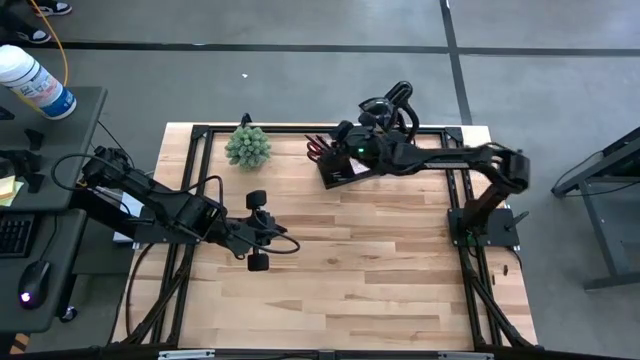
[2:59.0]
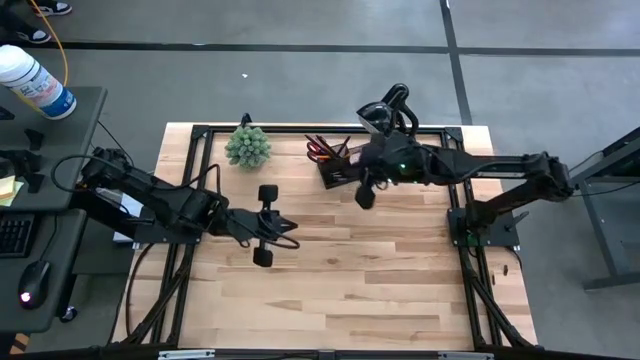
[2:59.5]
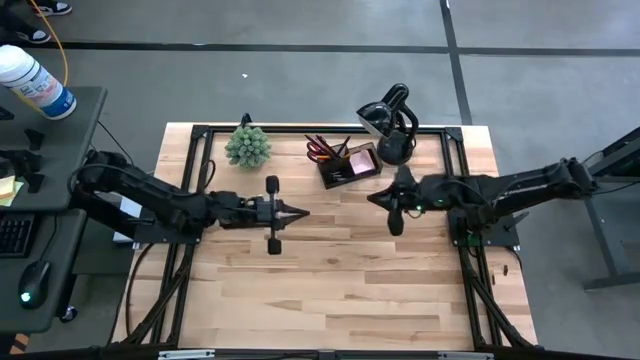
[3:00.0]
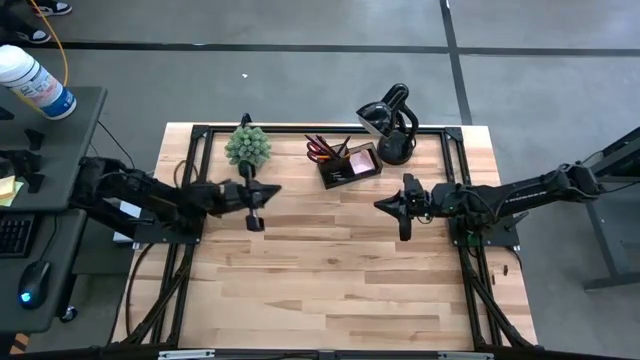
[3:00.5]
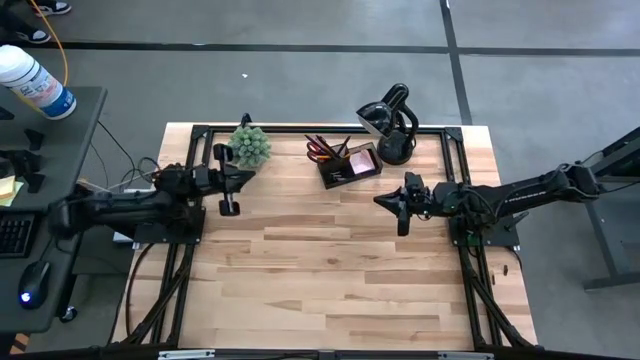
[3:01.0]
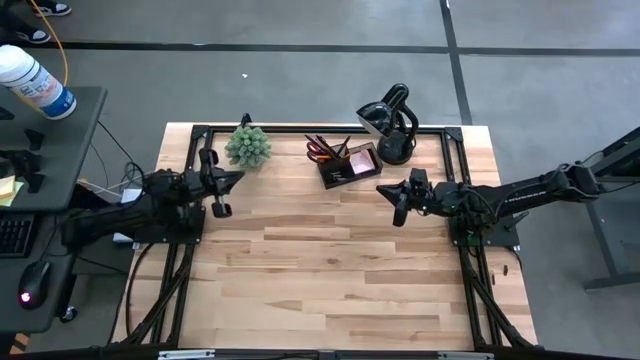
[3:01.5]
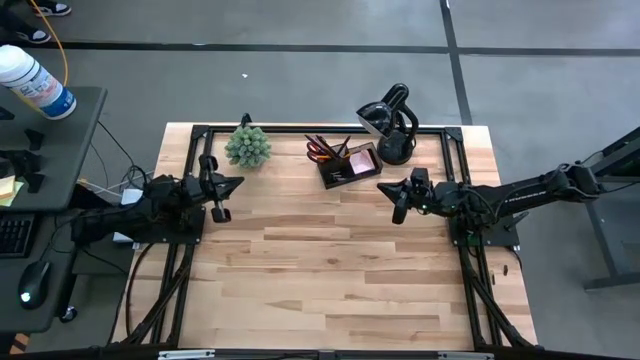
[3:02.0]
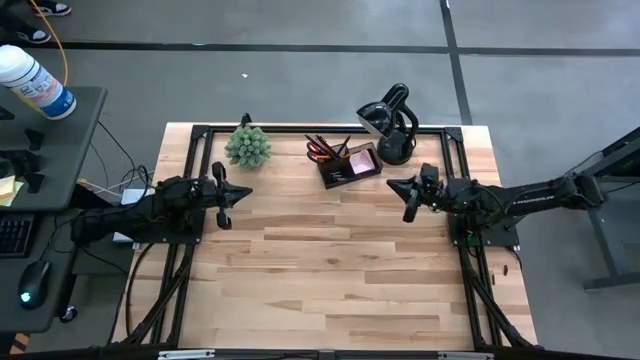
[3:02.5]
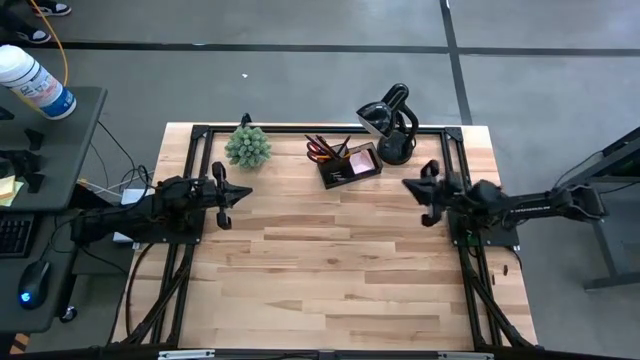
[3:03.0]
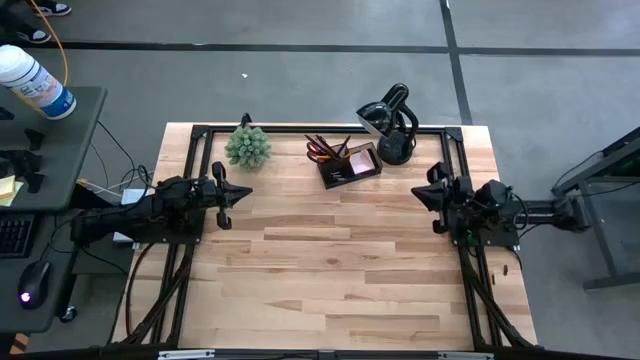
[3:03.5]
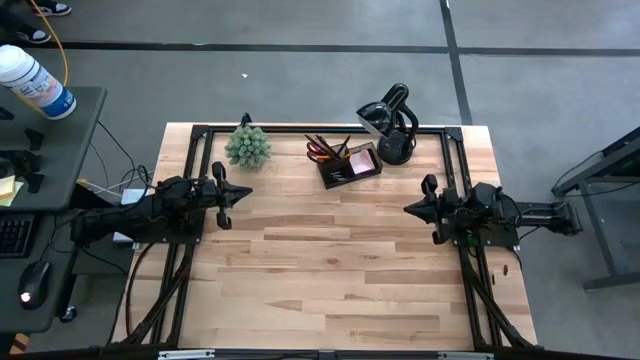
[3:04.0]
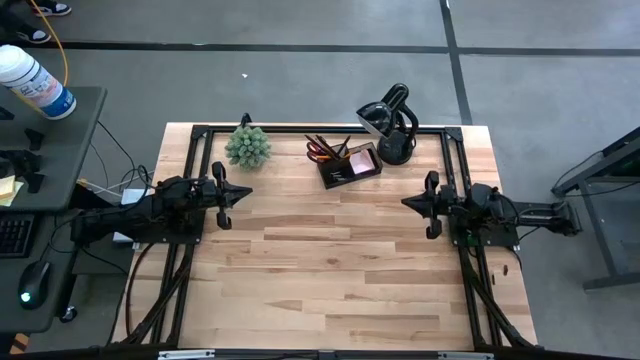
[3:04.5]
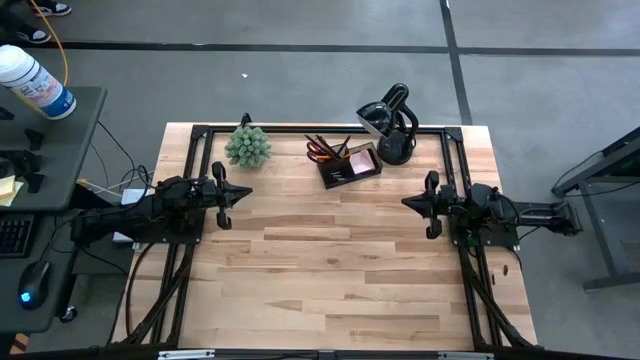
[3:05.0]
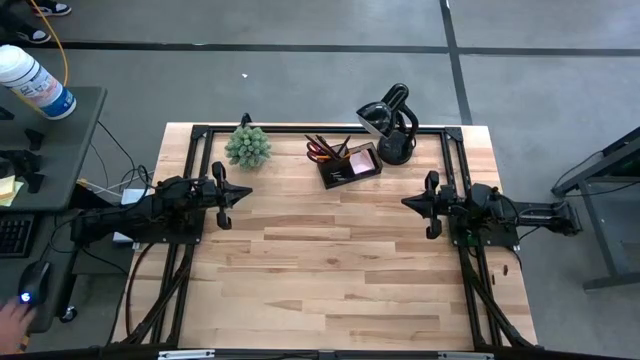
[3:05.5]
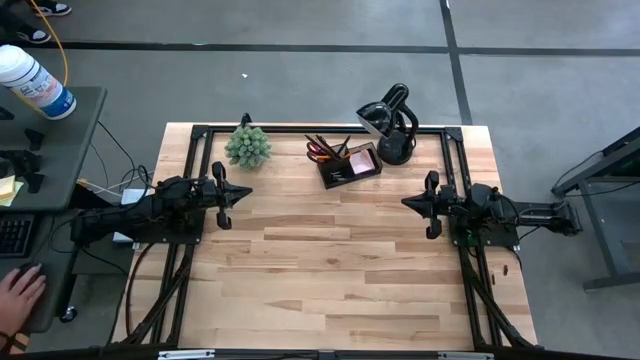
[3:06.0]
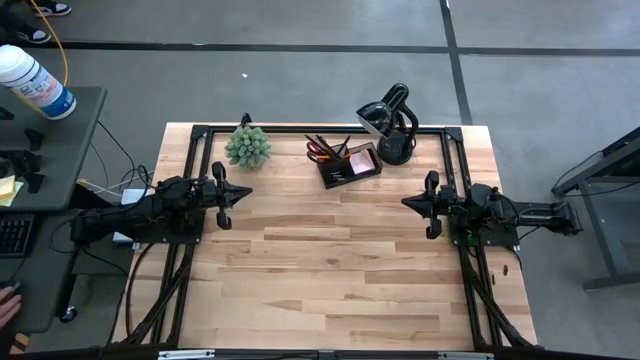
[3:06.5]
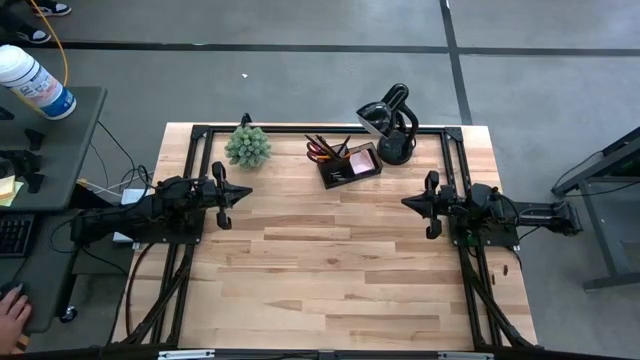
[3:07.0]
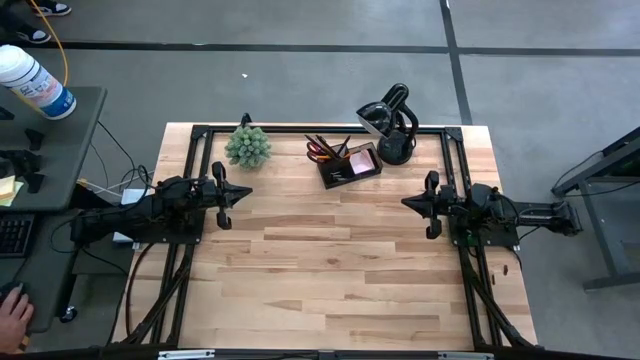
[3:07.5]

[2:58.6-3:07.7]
Task: Pick and place office supplies into organizer
Return to Home Position

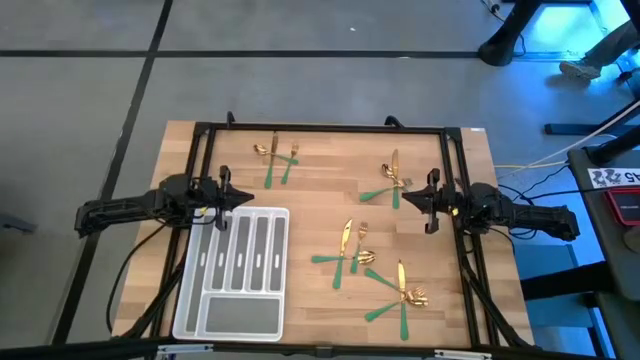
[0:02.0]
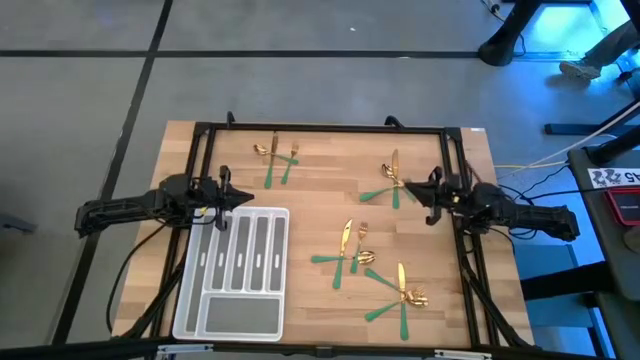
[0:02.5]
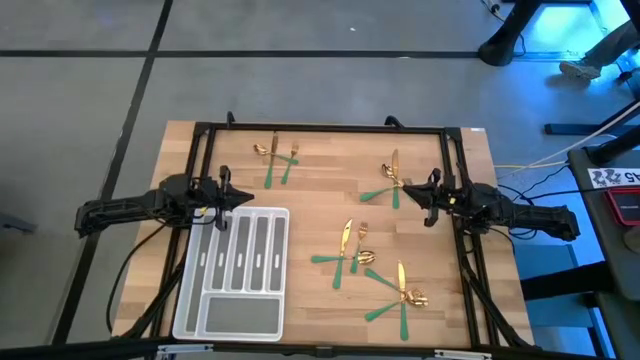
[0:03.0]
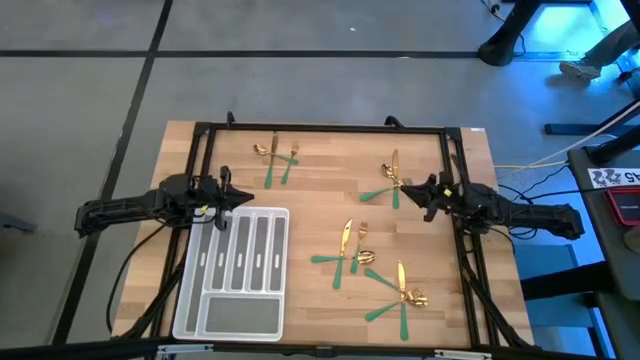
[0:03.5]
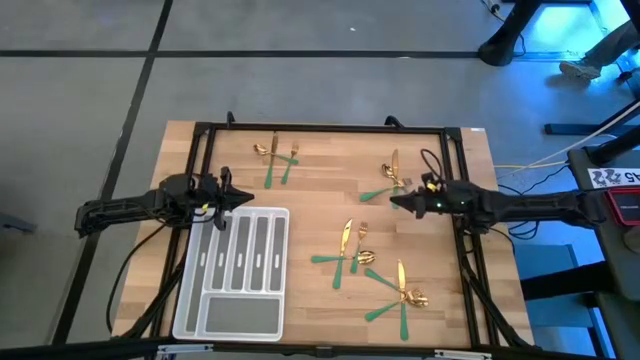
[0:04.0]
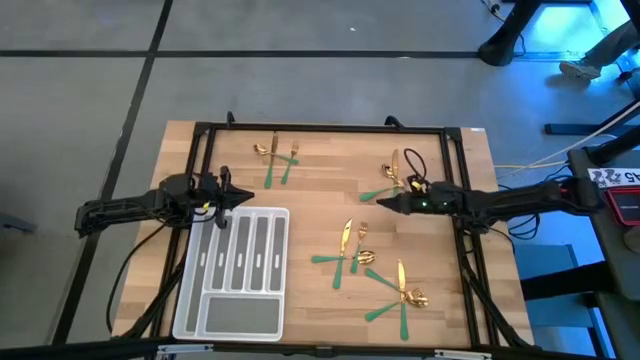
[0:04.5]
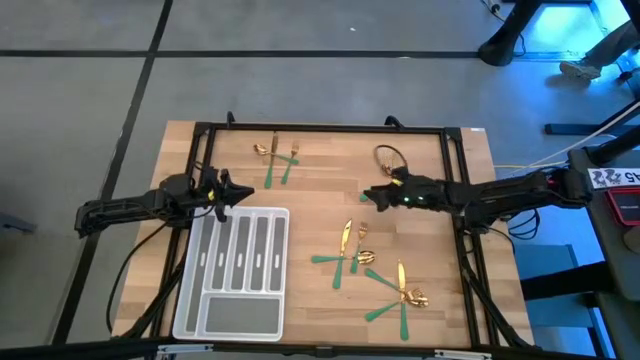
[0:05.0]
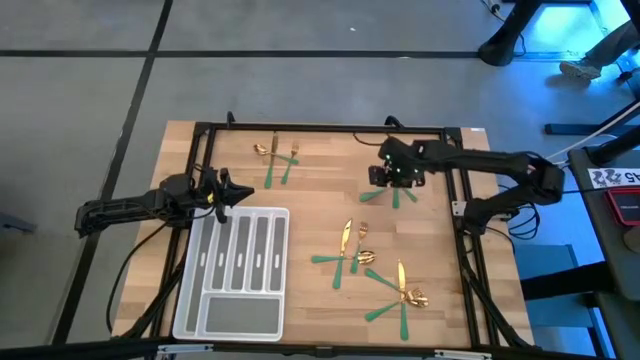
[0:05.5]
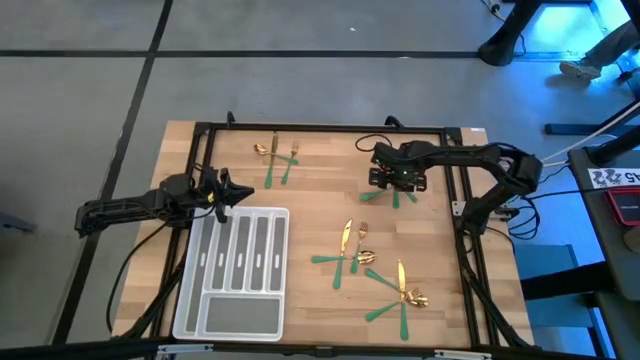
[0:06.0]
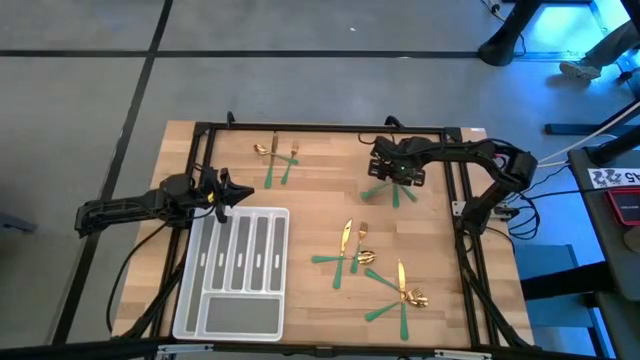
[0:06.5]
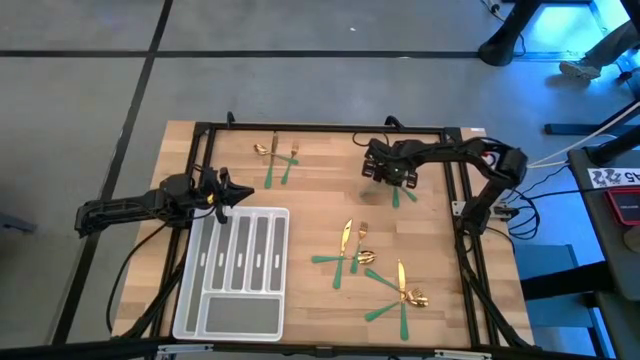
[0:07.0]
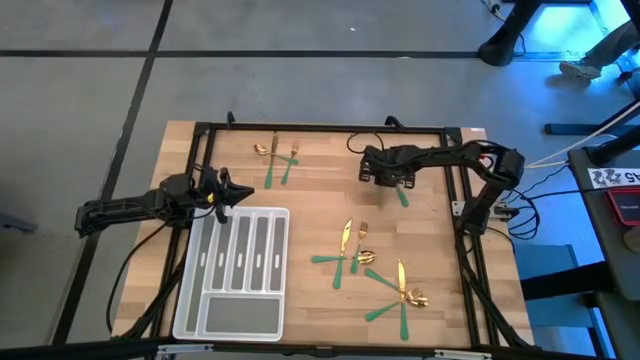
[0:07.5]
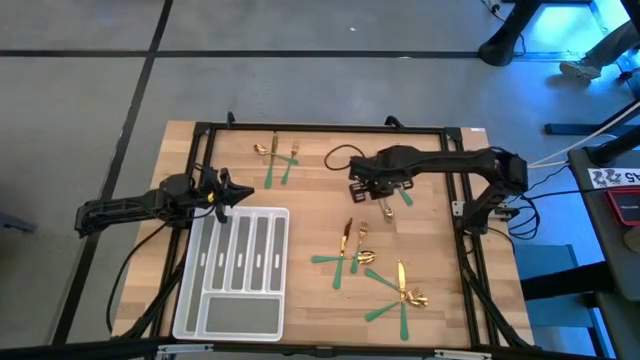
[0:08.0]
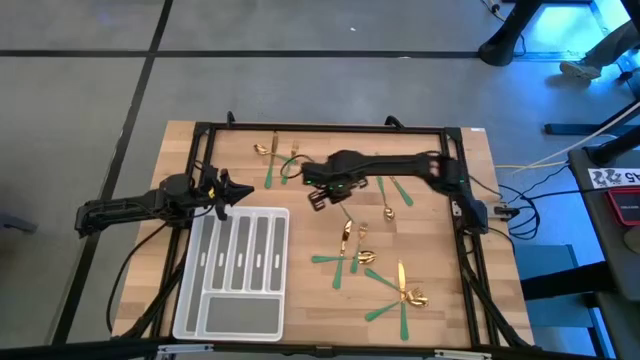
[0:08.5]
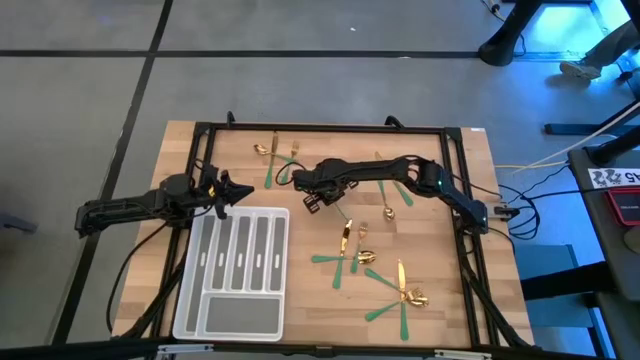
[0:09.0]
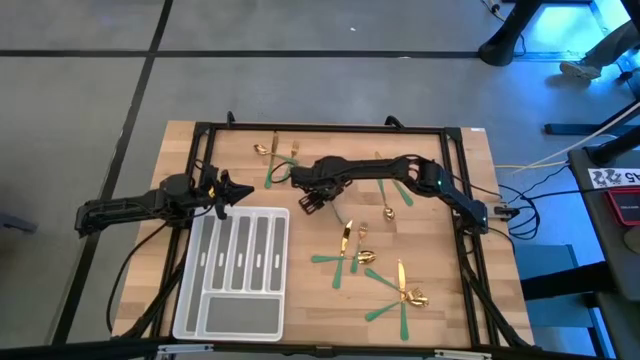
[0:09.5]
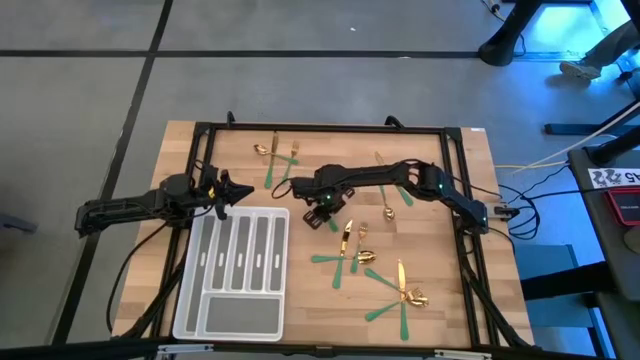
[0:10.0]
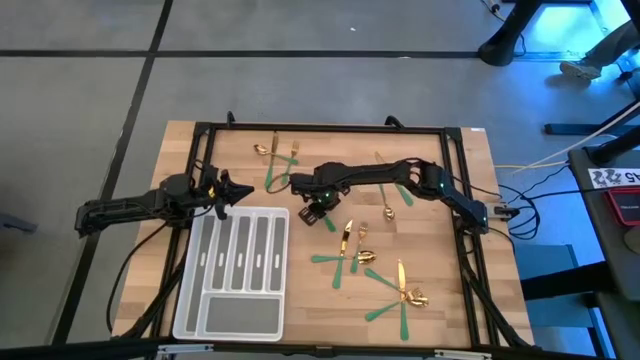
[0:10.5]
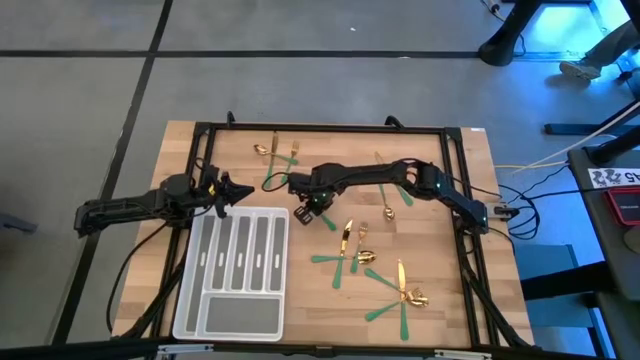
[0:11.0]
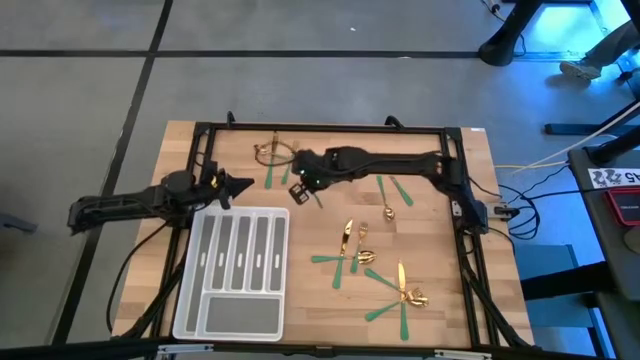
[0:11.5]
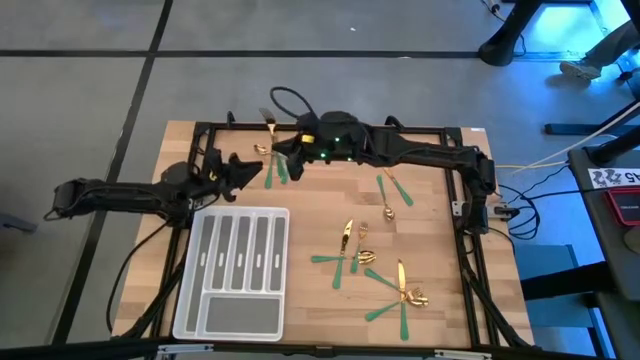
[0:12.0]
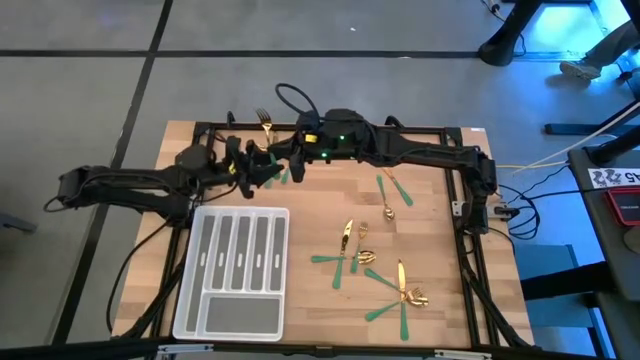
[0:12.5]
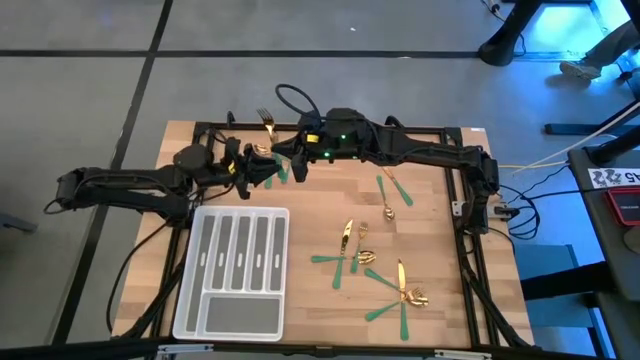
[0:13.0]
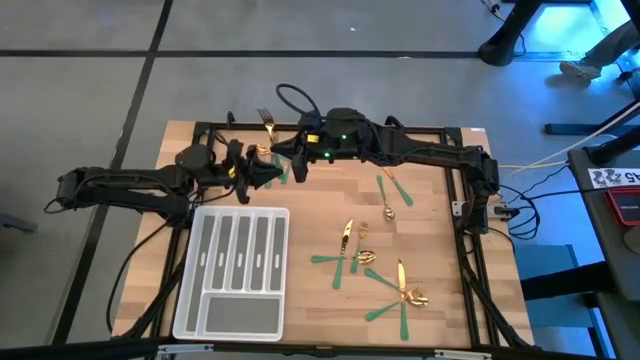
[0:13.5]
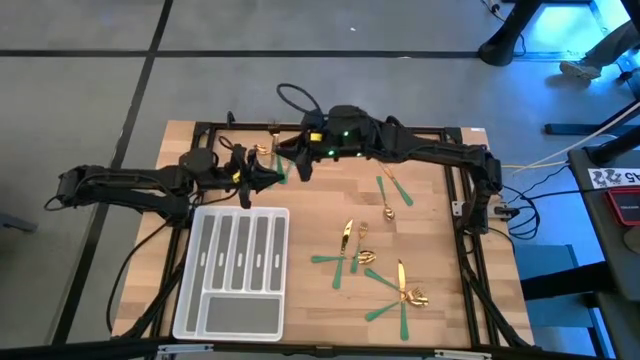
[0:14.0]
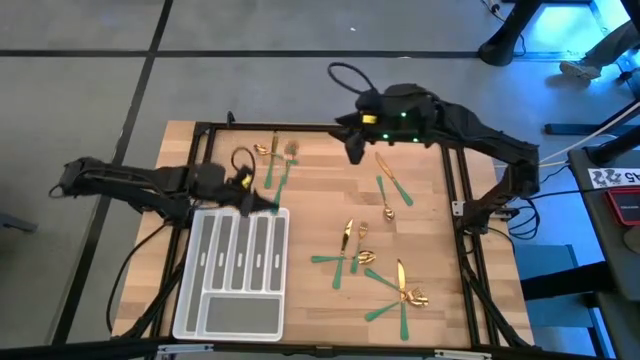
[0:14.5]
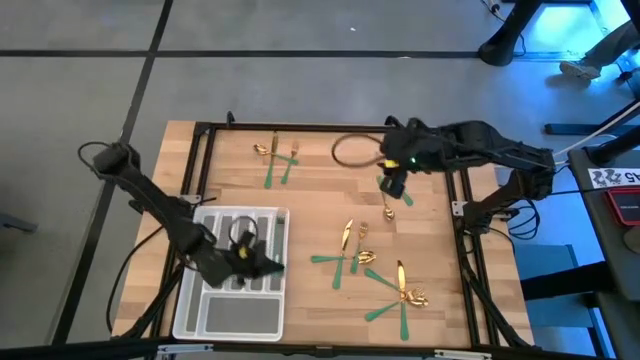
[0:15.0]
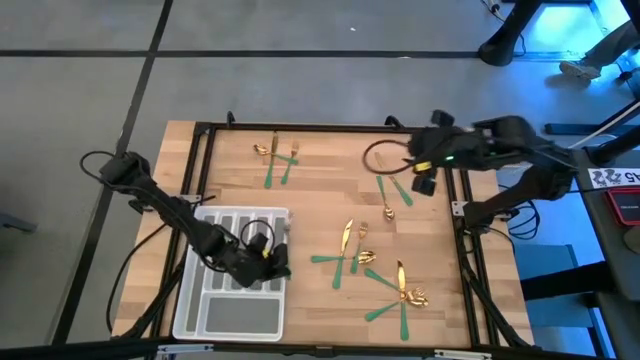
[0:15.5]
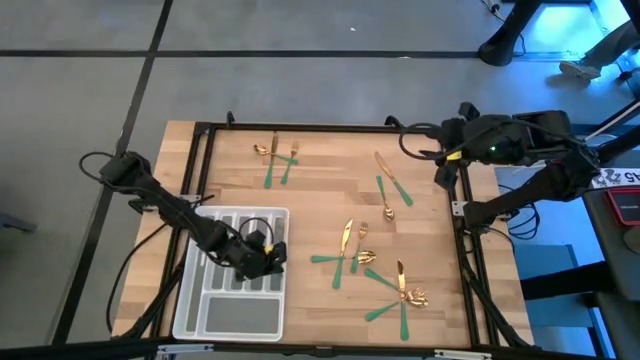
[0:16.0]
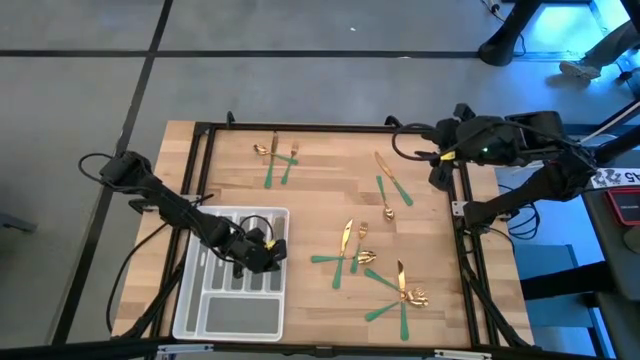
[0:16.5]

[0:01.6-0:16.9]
Task: Sort silverware
Put the fork into the silverware tray
